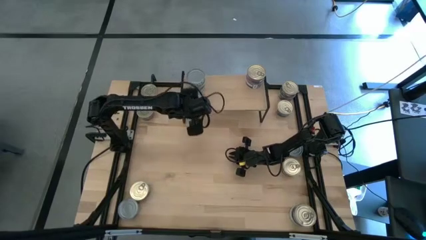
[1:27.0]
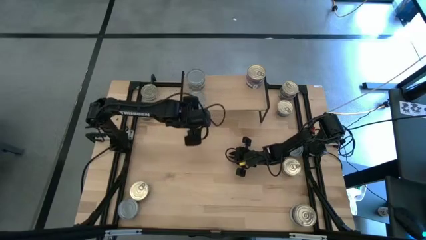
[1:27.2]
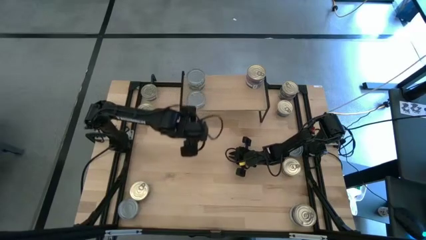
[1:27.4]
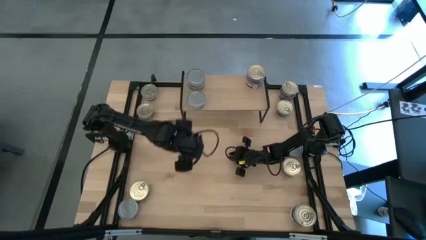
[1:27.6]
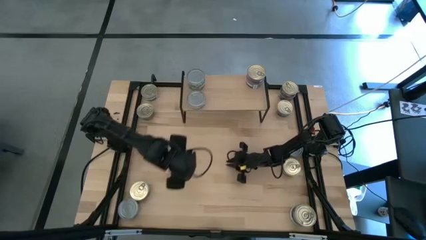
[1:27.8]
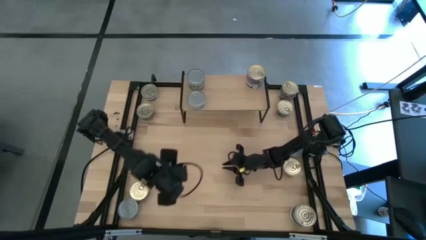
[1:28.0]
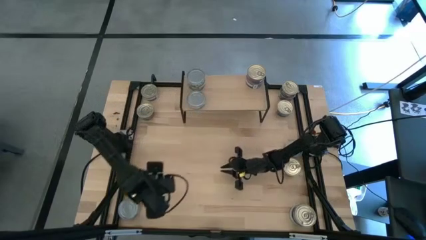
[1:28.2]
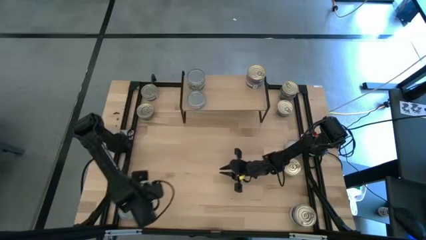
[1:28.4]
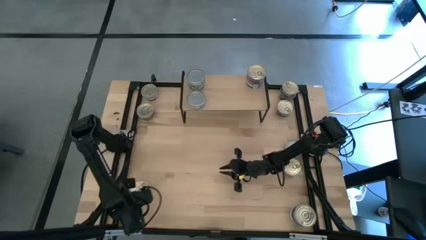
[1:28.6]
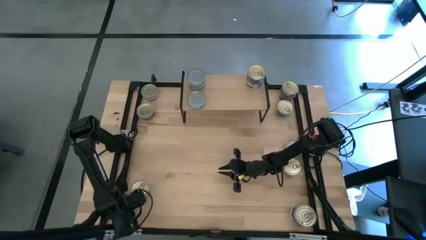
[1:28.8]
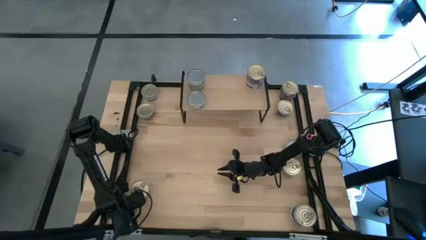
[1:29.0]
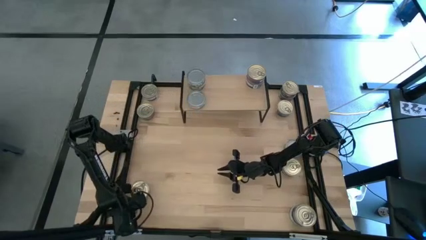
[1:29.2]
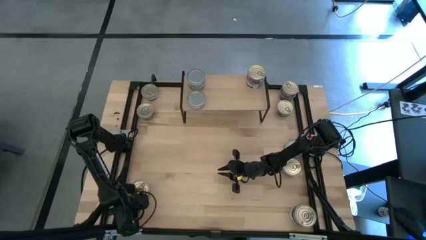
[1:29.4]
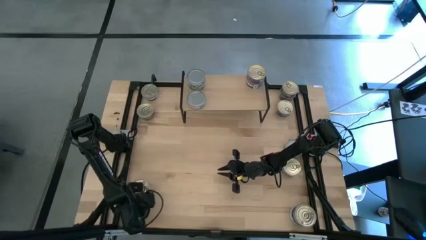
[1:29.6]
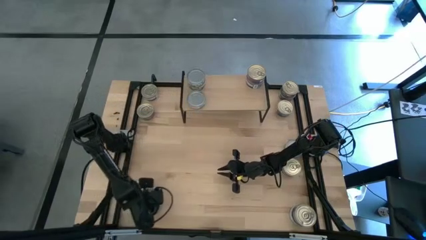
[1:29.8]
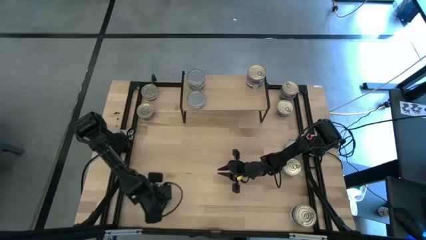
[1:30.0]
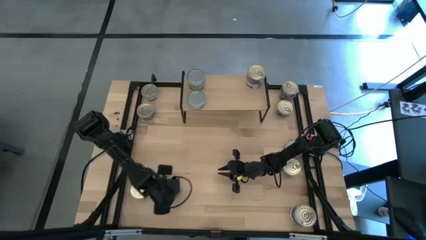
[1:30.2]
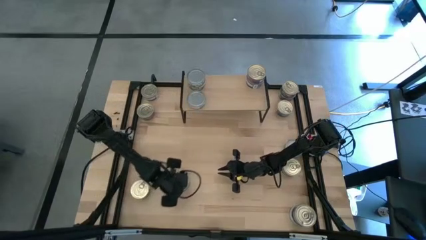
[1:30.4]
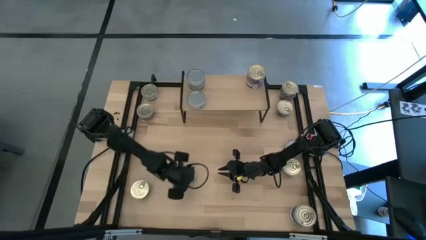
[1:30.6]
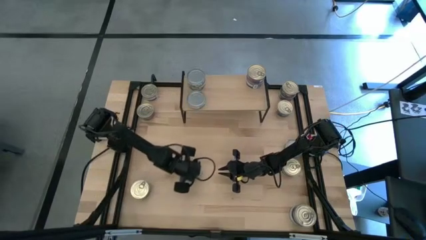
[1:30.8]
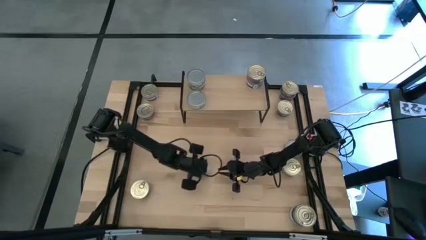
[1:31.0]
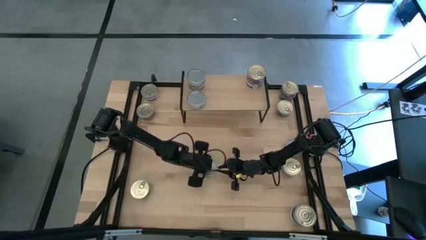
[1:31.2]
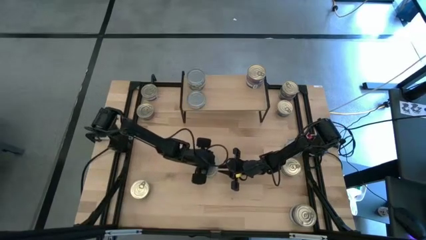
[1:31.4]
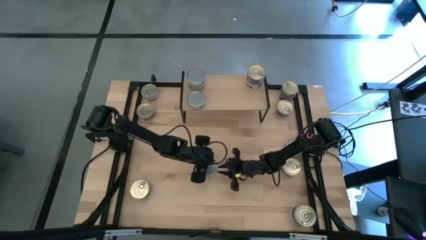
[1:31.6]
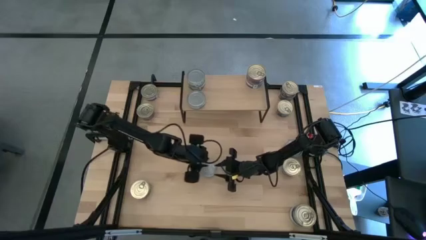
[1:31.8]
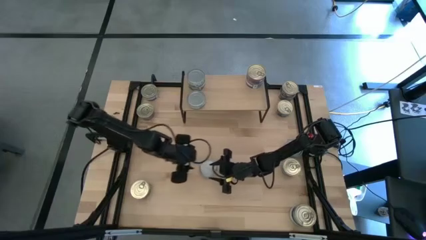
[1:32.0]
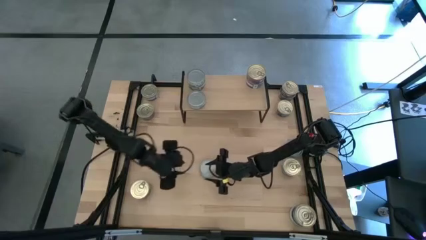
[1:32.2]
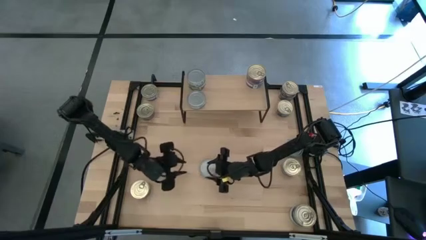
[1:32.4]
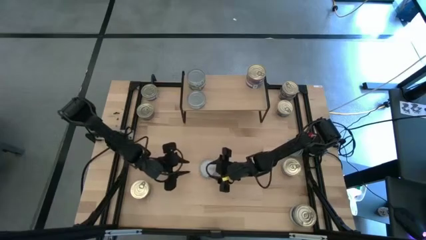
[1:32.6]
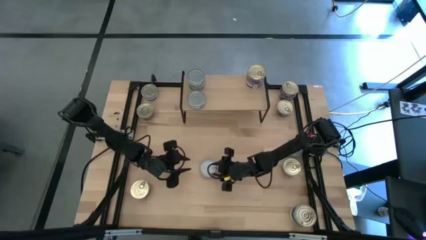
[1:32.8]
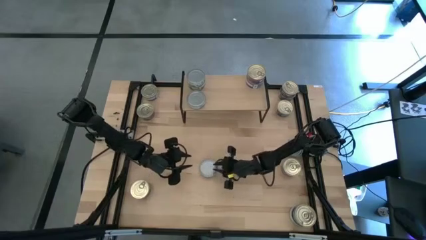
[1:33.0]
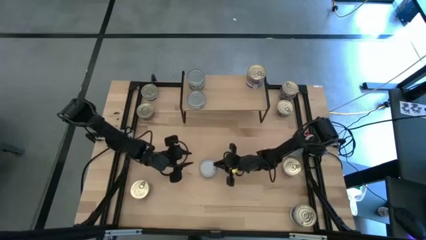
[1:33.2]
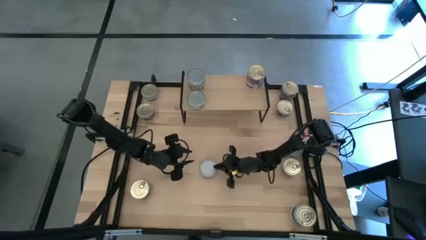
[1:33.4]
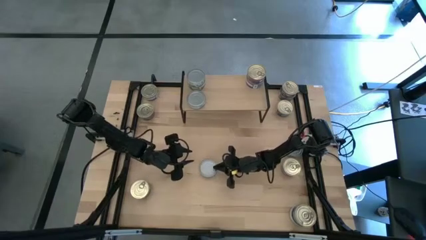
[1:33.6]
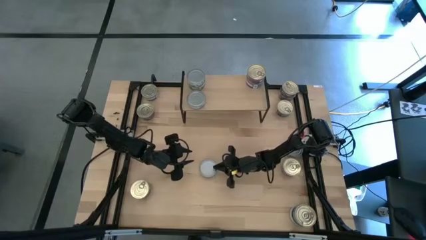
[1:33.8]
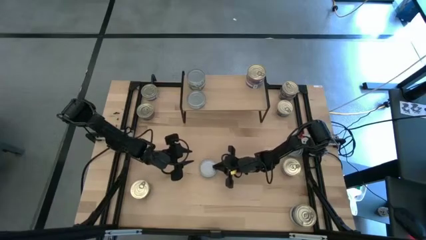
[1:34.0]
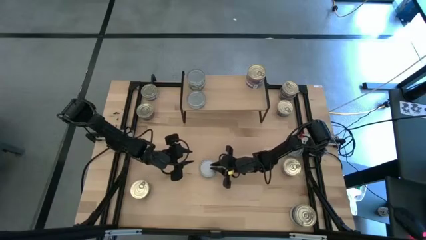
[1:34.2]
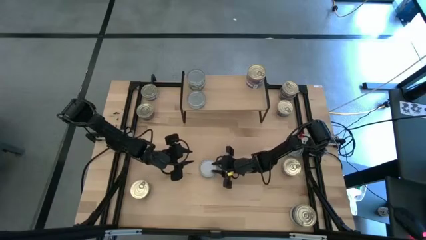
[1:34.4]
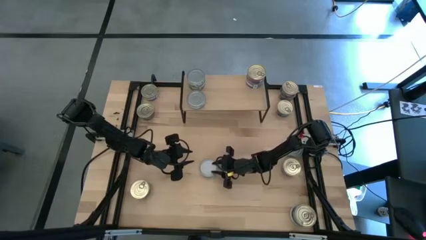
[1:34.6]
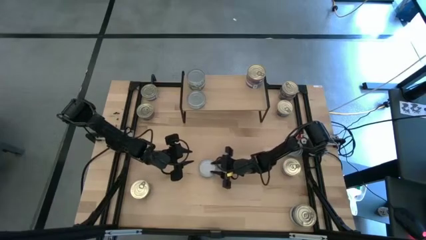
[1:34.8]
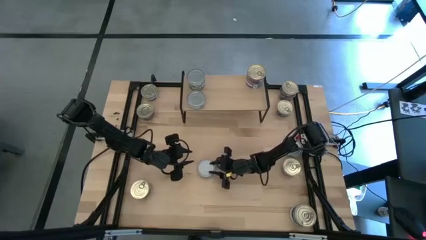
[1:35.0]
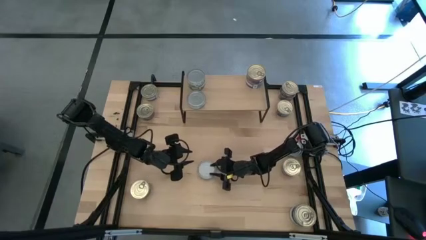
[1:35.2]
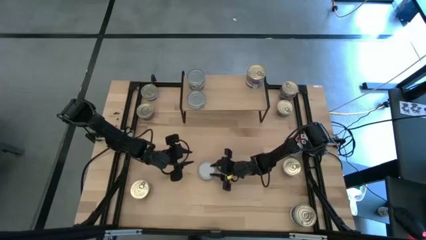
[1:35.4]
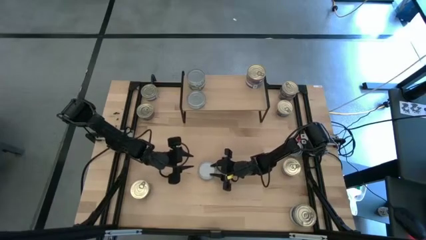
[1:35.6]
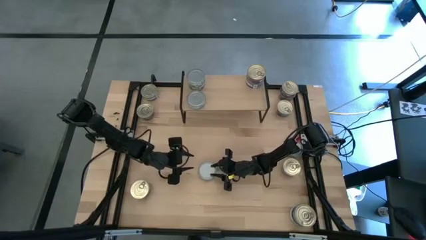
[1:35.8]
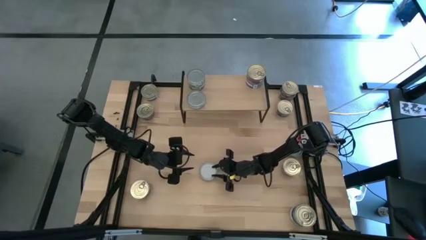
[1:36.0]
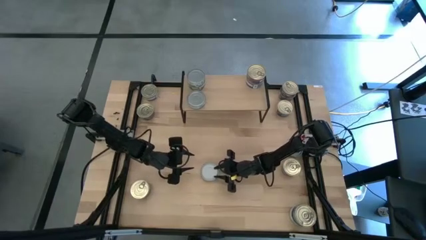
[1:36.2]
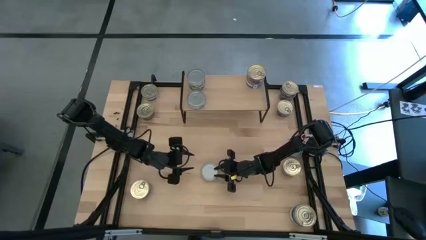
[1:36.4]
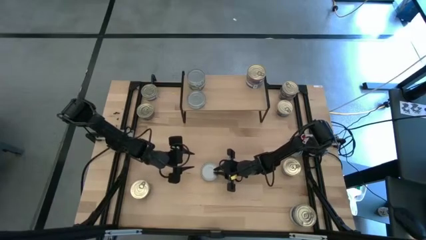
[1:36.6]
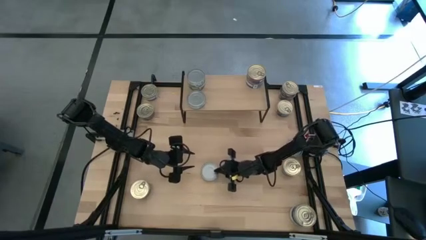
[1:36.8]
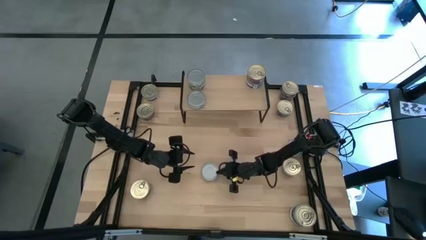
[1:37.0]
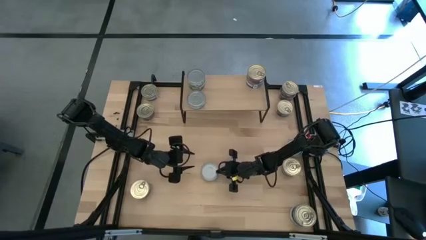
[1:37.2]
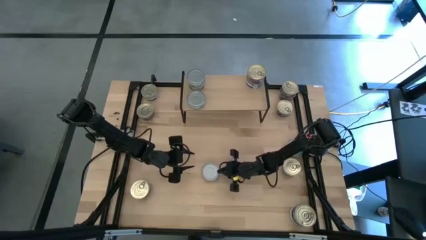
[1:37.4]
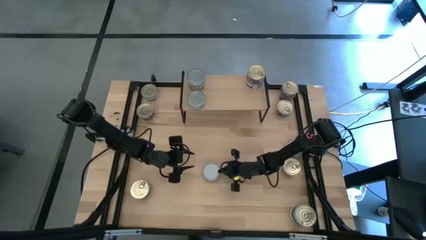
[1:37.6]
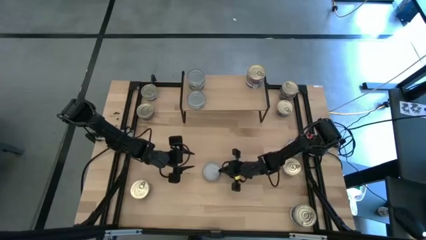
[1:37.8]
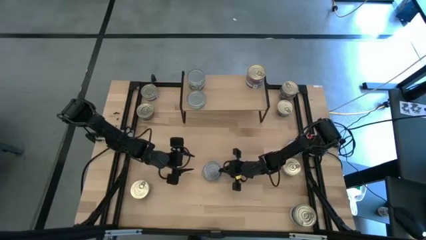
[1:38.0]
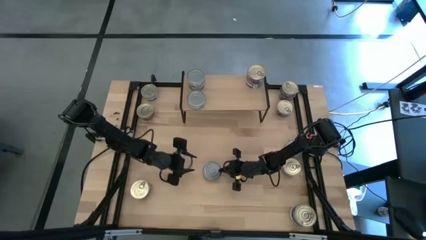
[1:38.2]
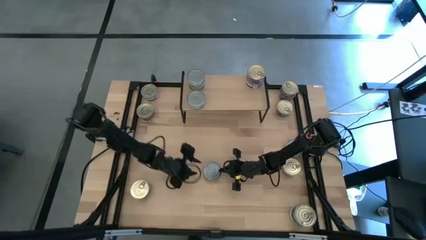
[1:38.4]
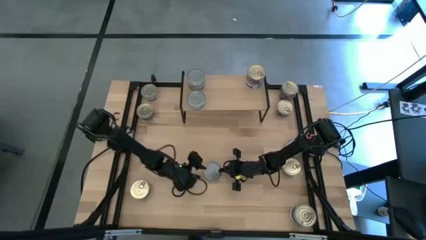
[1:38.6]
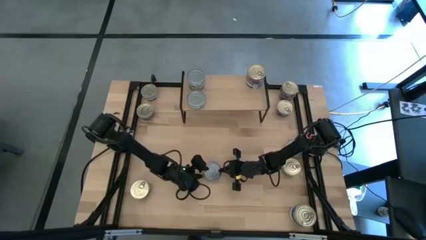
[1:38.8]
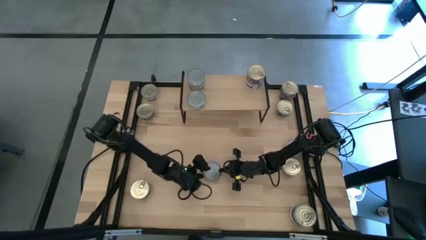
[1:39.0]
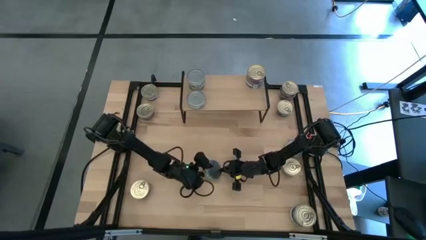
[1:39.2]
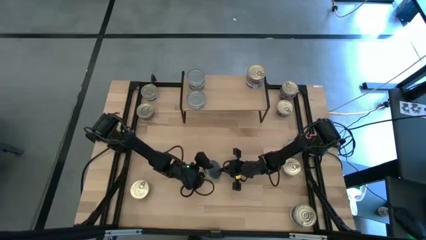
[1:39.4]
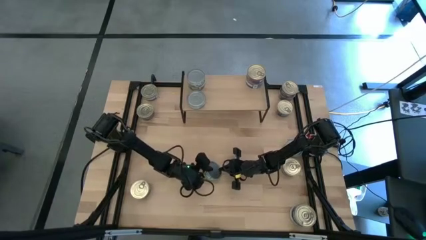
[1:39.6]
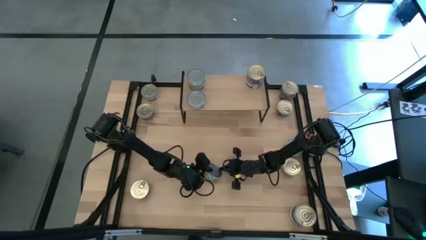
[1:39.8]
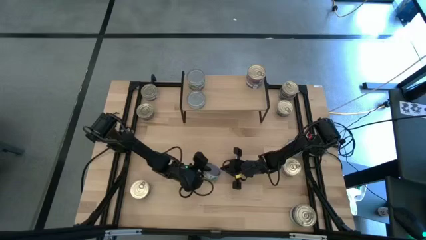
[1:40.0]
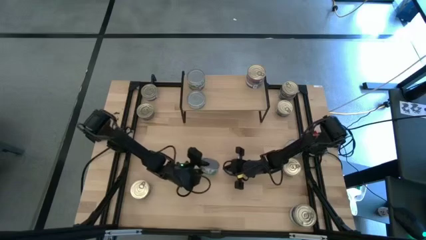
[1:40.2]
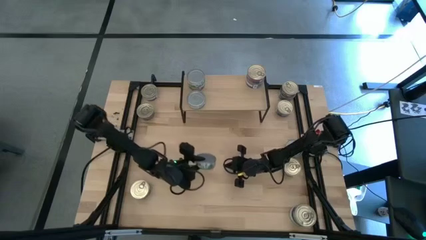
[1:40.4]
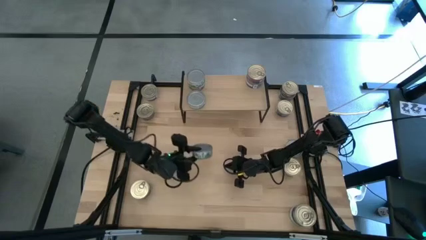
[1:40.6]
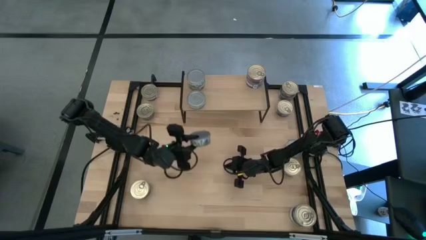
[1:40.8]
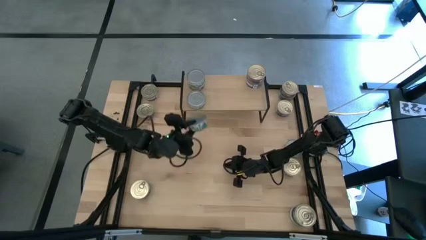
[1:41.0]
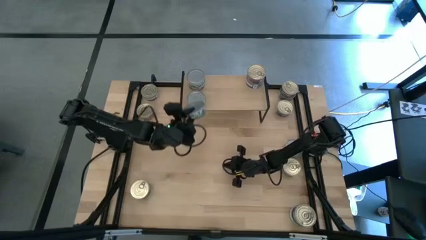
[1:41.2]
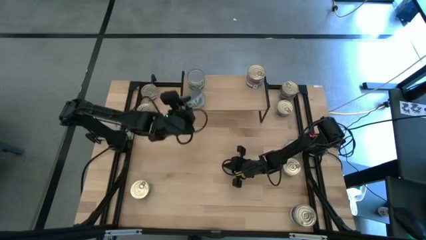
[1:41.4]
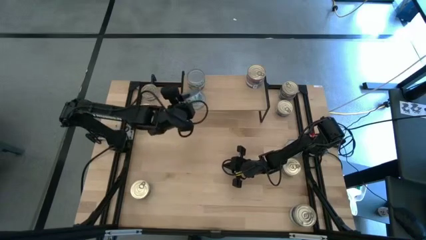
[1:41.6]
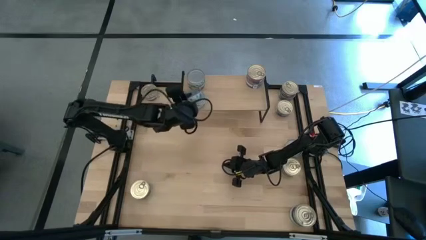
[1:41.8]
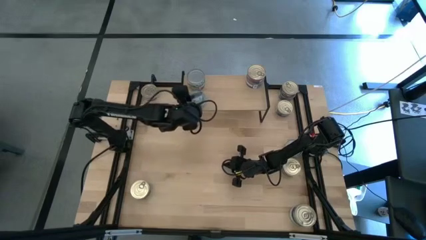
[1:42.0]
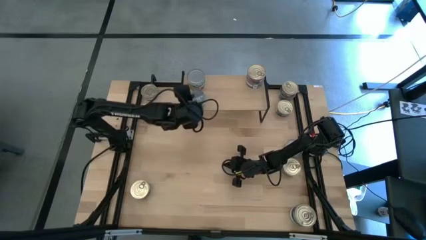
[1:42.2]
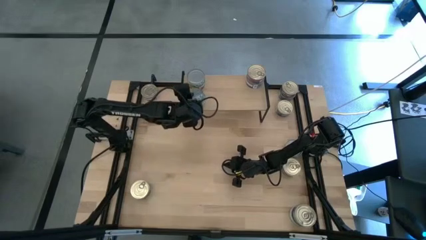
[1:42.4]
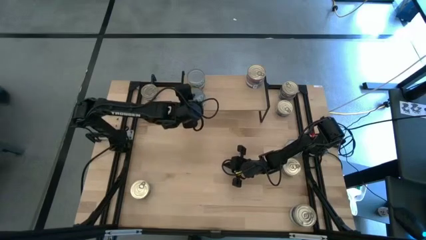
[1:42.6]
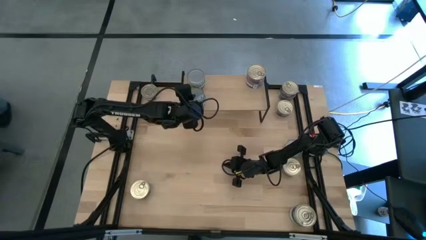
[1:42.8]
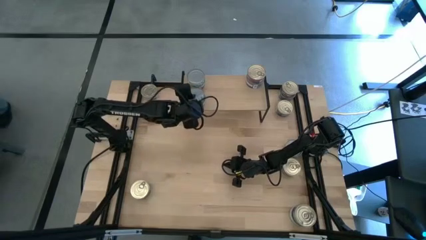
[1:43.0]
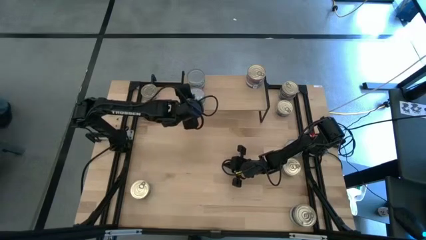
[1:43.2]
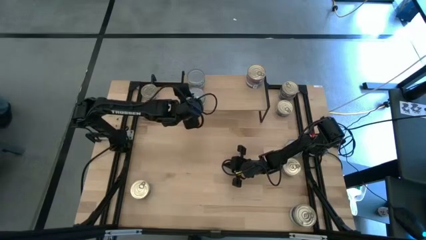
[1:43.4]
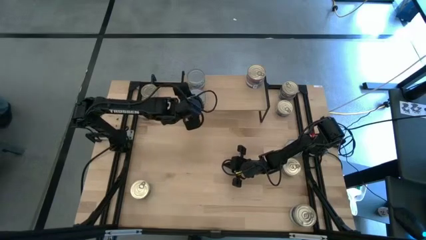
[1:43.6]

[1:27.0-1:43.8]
Task: Stack canned seafood by type on shelf
Stack the green white tuna can on top of the green white tuna can on the shelf

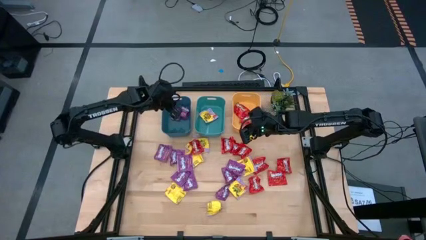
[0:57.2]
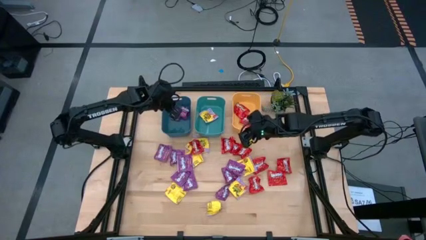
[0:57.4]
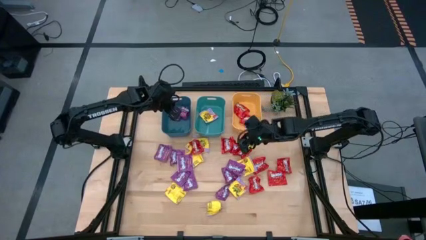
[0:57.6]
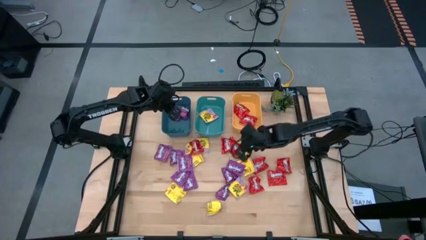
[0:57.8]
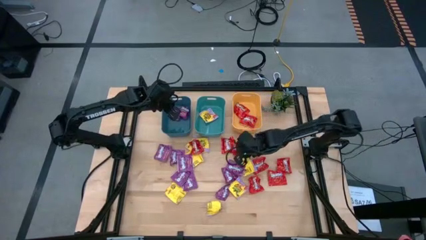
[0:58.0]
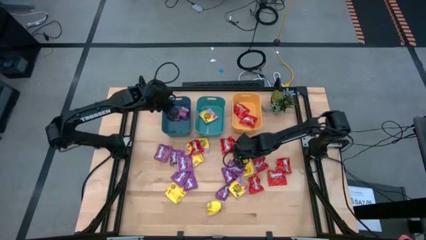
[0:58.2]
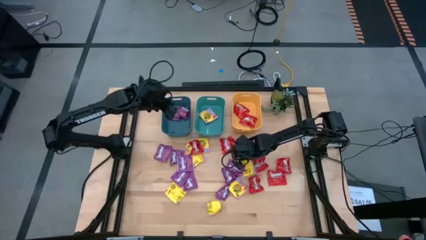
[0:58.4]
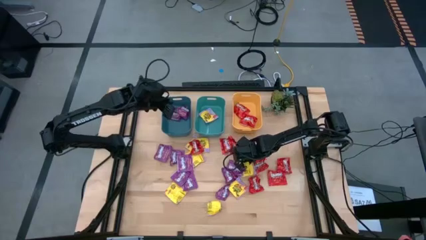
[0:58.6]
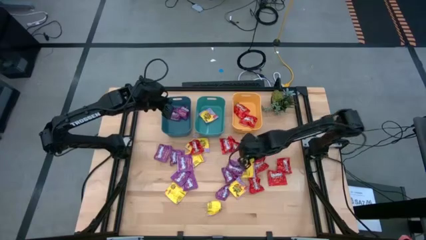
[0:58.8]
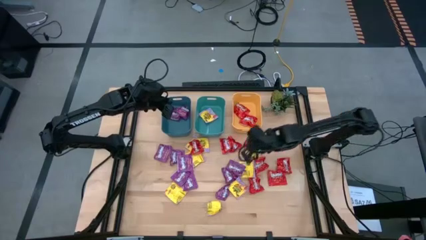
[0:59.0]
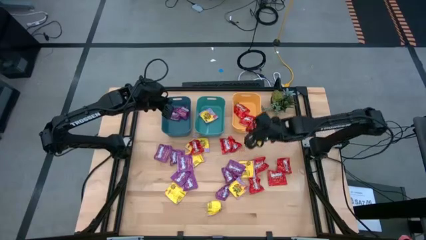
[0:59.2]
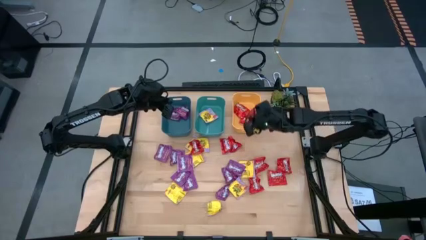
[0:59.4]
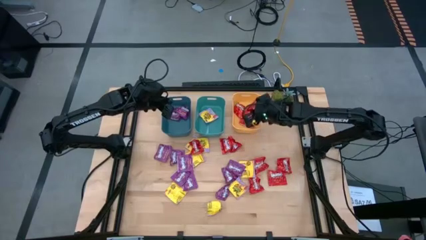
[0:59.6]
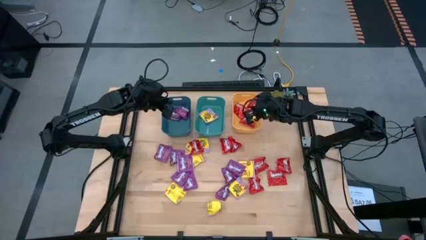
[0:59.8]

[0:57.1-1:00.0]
Task: Sort candy
Put the red candy into the yellow bin
